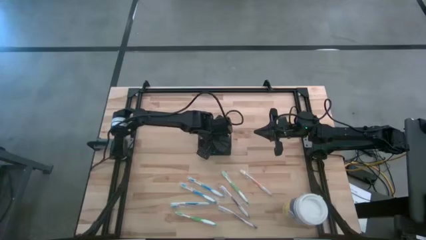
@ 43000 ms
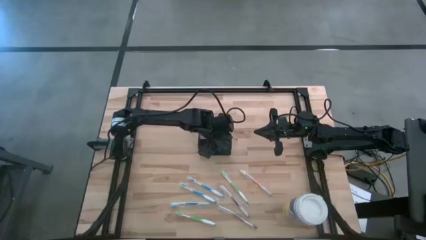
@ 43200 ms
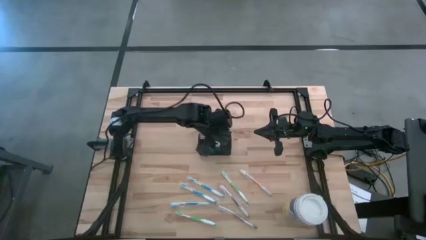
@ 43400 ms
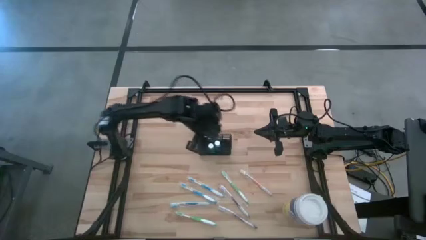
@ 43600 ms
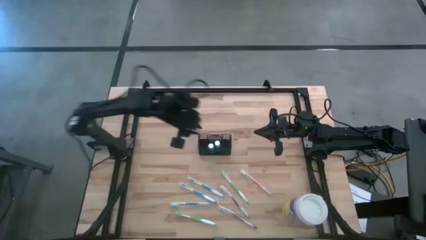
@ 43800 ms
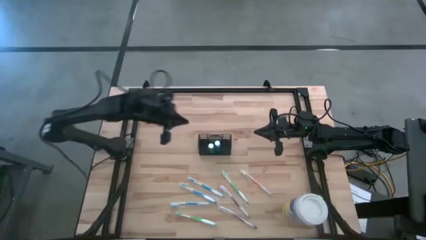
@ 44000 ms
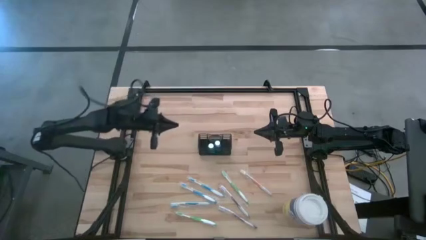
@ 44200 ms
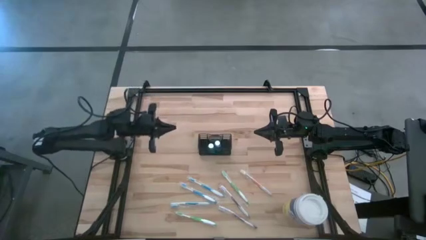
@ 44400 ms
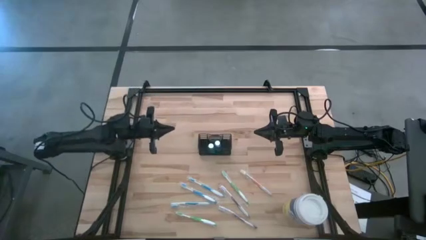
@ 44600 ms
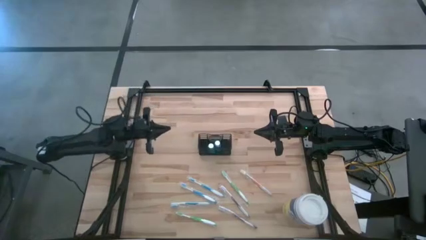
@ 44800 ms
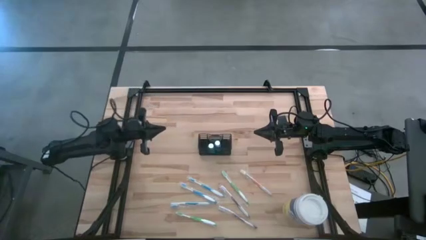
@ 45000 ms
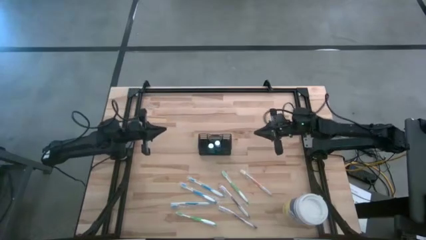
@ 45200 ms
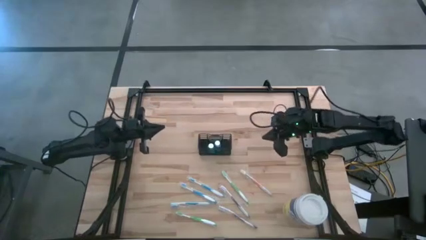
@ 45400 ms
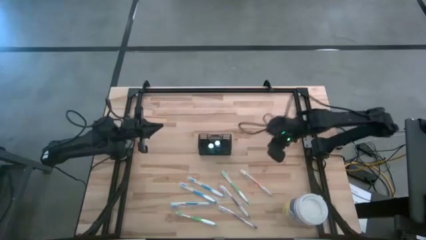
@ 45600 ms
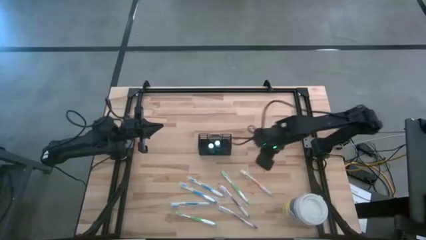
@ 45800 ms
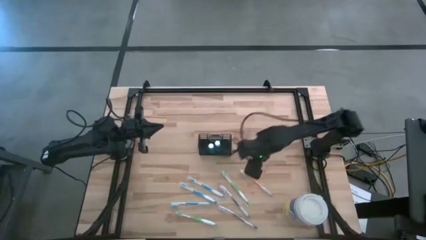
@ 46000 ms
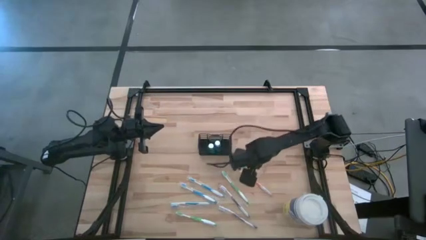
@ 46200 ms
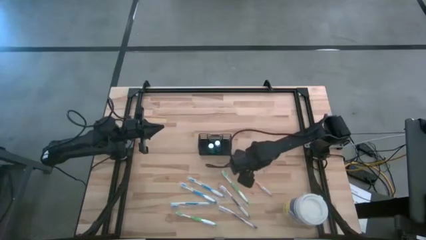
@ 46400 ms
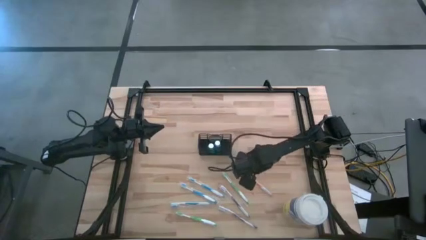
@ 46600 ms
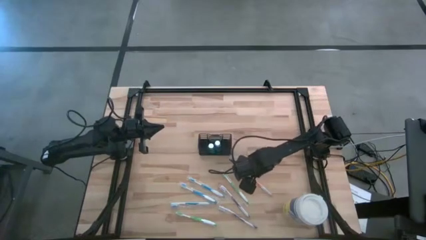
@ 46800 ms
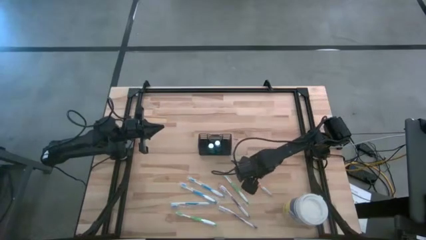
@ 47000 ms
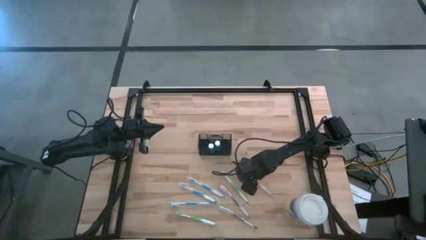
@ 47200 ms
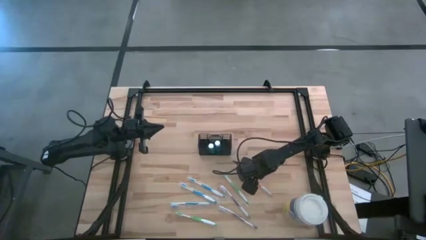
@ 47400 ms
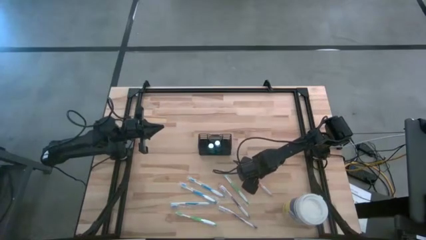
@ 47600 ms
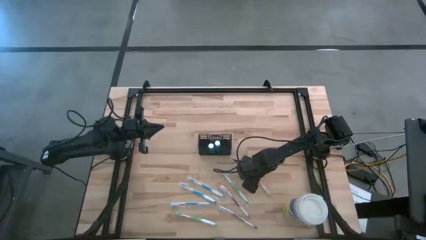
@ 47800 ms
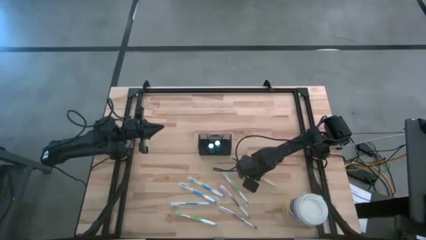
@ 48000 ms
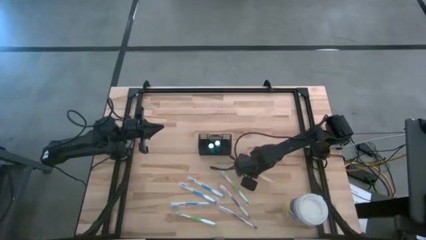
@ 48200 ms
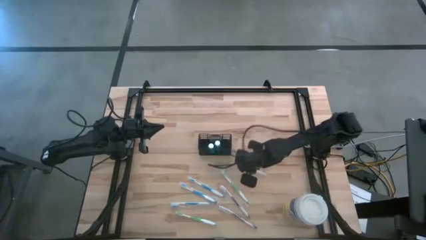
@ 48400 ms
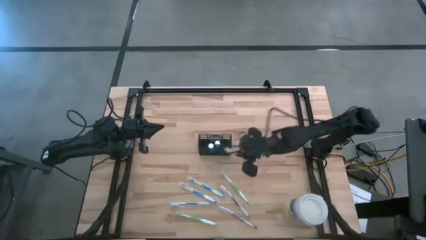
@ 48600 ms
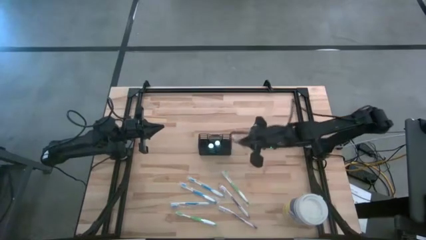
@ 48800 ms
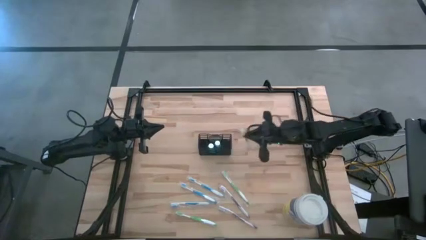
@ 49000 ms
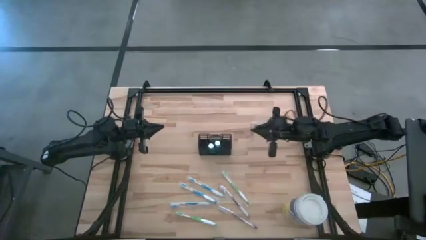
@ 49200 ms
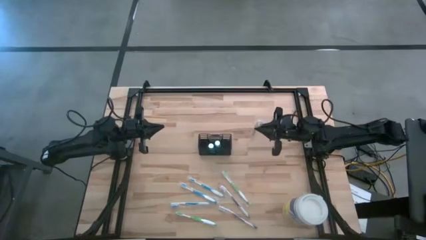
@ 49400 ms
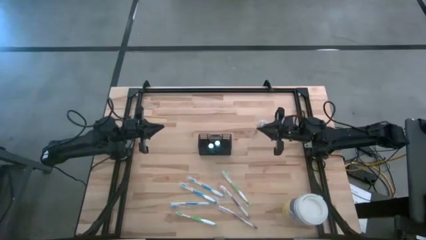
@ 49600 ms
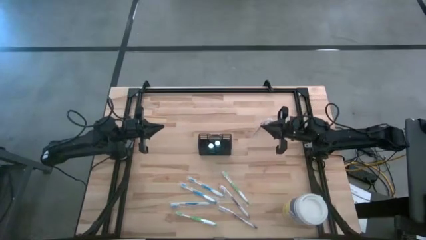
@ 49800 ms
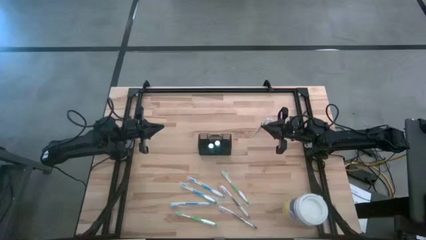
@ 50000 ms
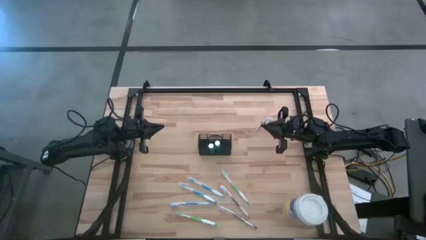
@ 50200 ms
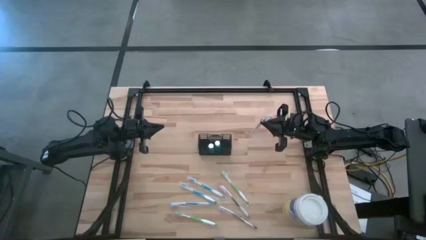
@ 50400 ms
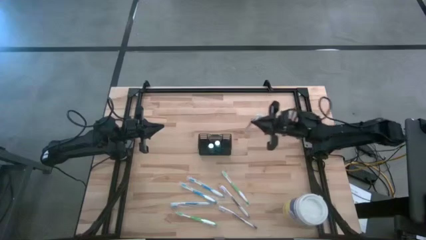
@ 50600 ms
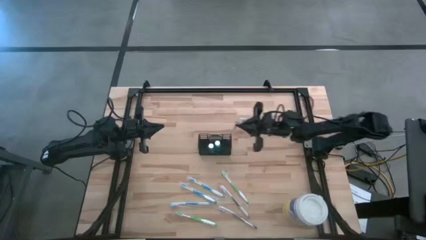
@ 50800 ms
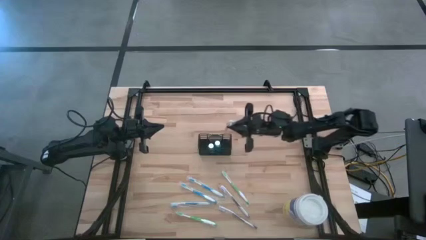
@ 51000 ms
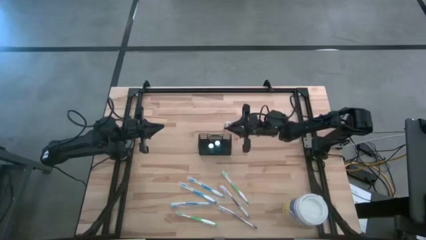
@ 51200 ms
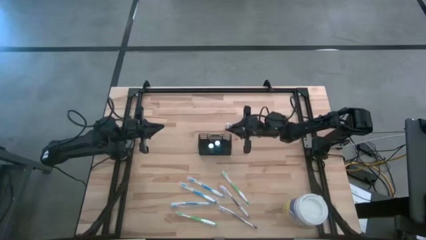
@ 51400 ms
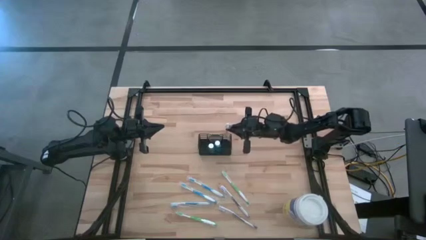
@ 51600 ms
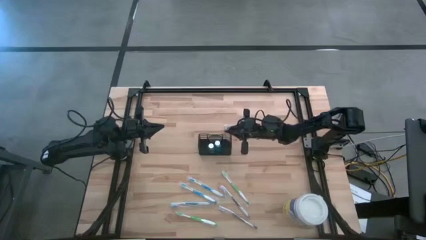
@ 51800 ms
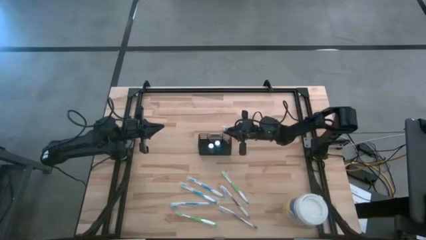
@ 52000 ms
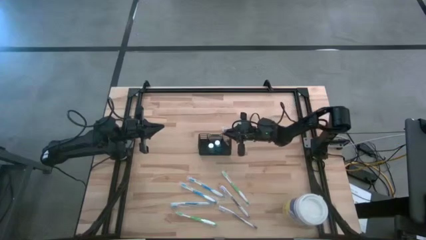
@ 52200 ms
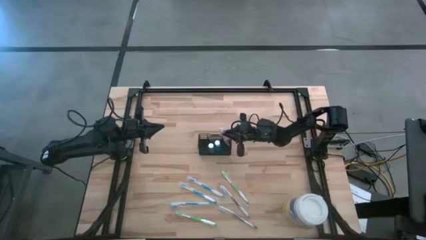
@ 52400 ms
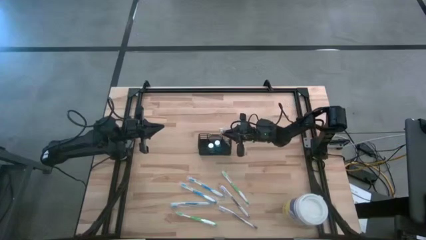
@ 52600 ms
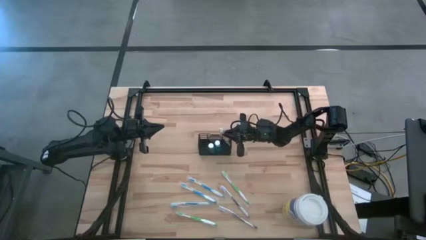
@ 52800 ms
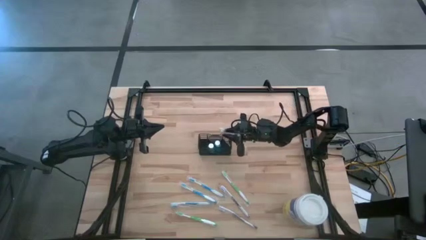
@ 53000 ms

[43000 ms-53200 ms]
Task: Pick & Place toothbrushing station
Put the orange toothbrush into the black mesh organizer
